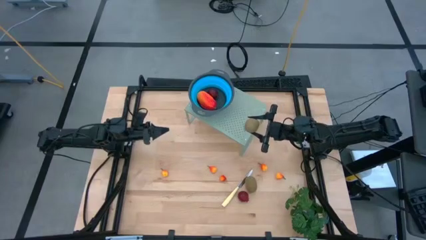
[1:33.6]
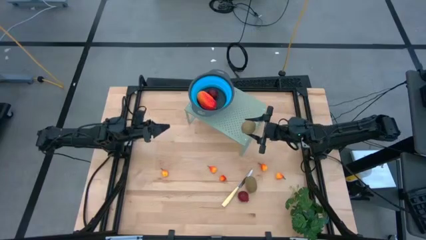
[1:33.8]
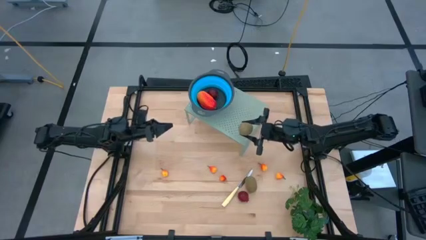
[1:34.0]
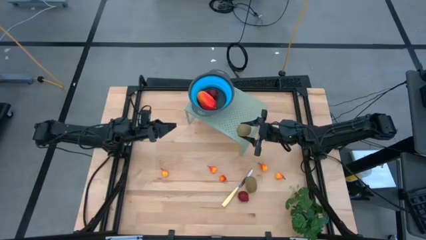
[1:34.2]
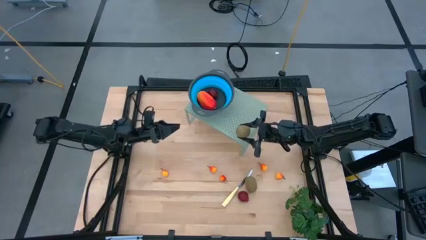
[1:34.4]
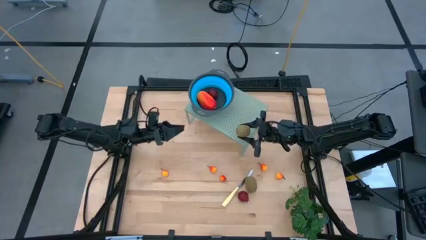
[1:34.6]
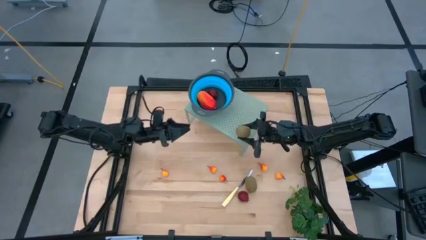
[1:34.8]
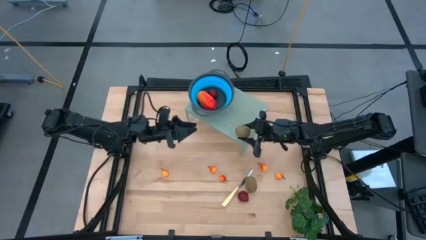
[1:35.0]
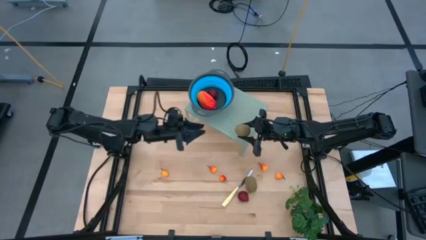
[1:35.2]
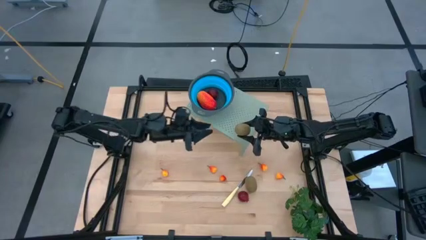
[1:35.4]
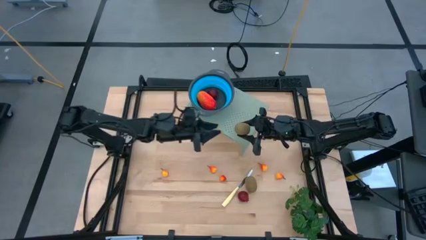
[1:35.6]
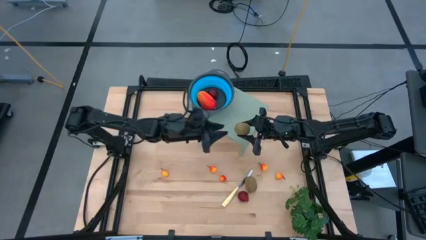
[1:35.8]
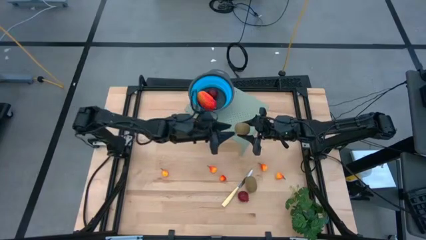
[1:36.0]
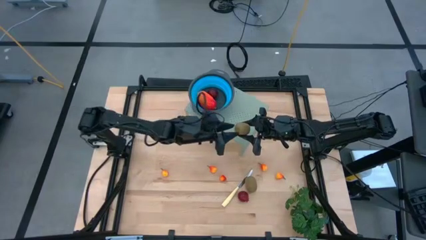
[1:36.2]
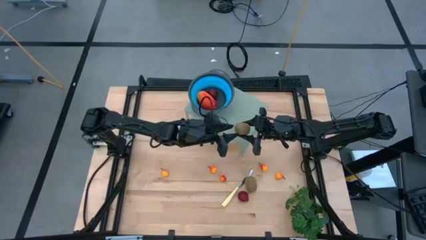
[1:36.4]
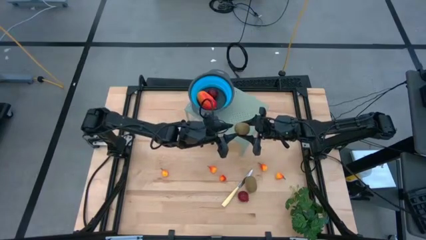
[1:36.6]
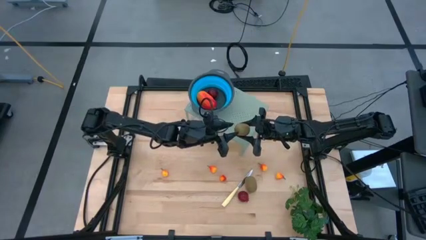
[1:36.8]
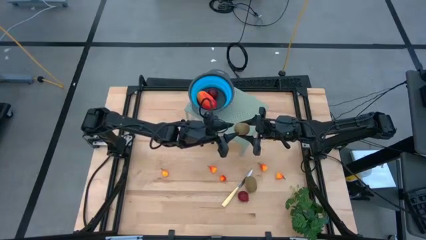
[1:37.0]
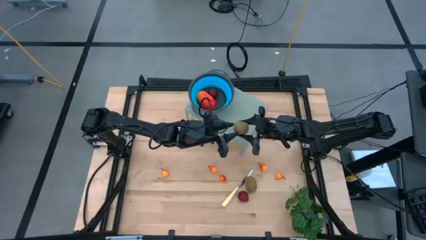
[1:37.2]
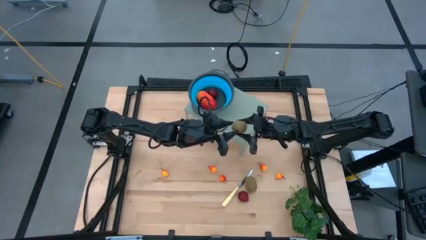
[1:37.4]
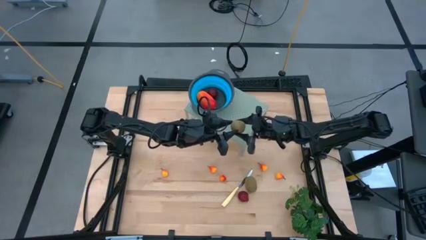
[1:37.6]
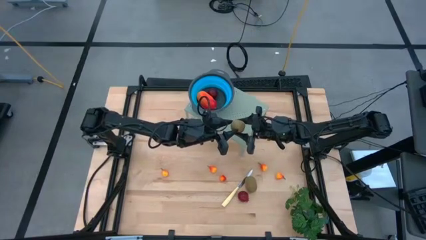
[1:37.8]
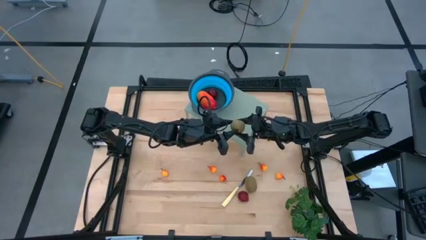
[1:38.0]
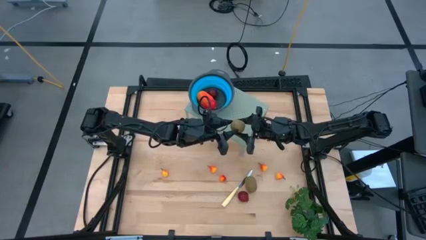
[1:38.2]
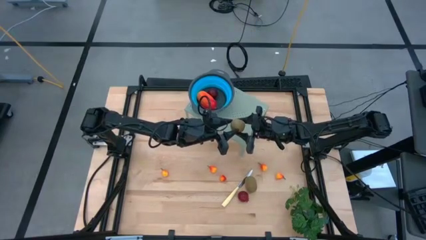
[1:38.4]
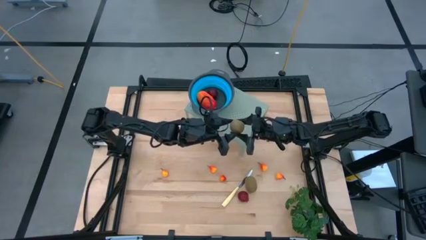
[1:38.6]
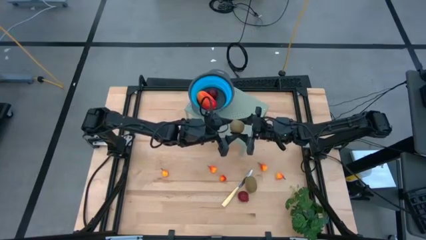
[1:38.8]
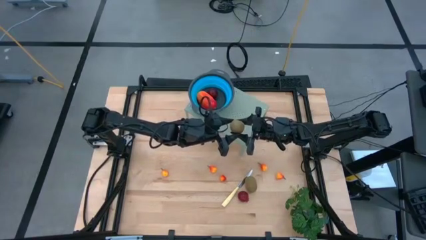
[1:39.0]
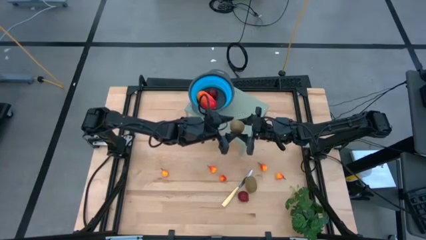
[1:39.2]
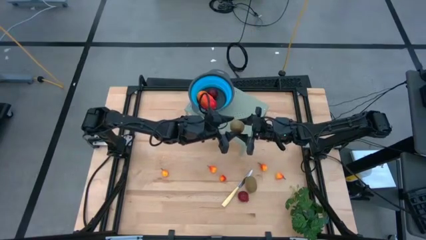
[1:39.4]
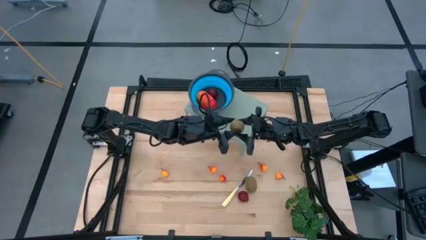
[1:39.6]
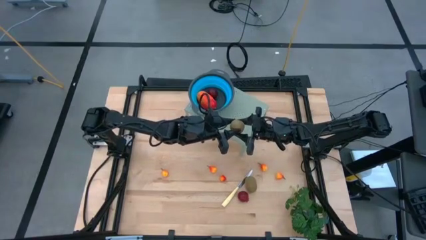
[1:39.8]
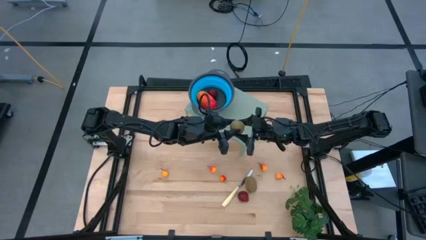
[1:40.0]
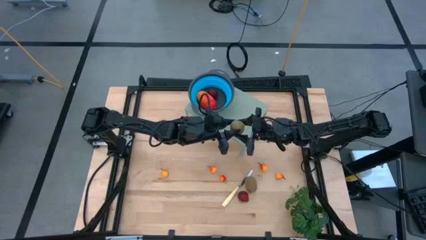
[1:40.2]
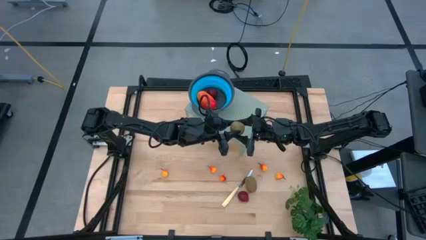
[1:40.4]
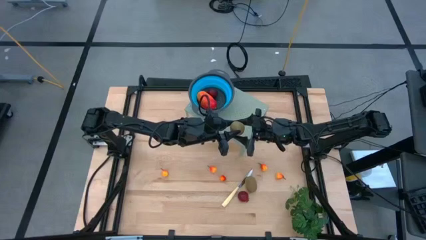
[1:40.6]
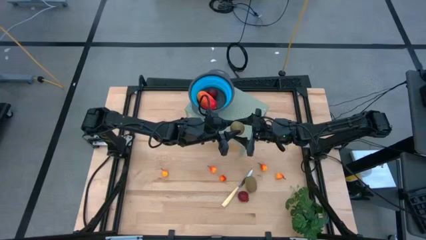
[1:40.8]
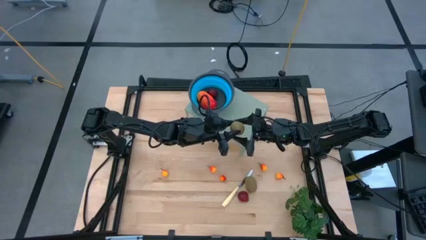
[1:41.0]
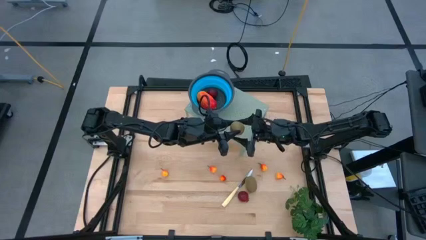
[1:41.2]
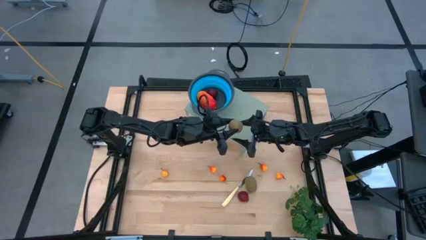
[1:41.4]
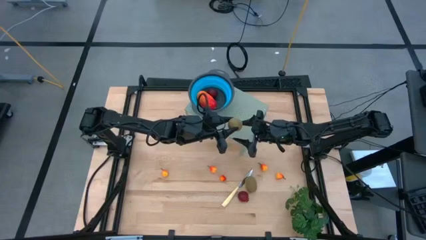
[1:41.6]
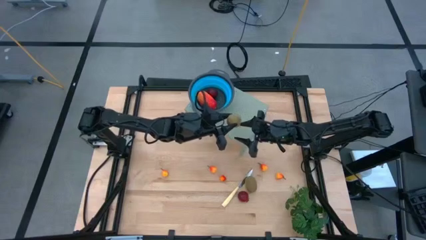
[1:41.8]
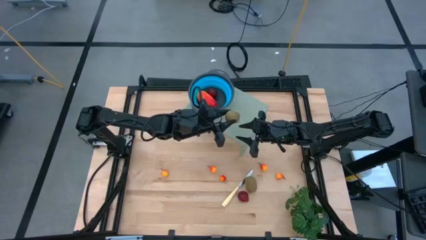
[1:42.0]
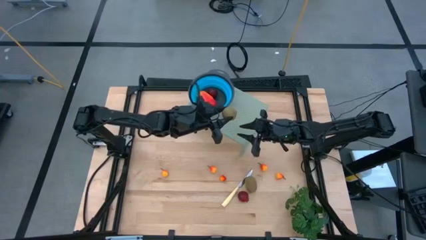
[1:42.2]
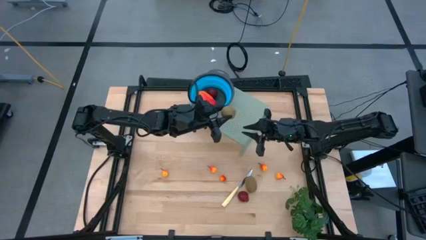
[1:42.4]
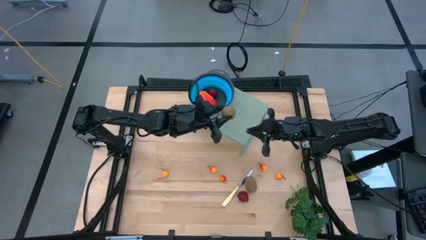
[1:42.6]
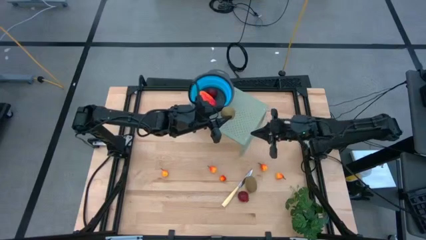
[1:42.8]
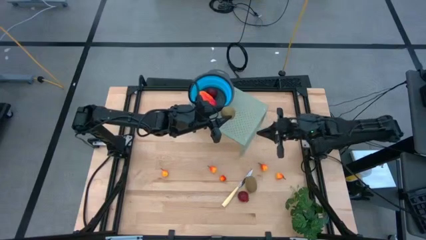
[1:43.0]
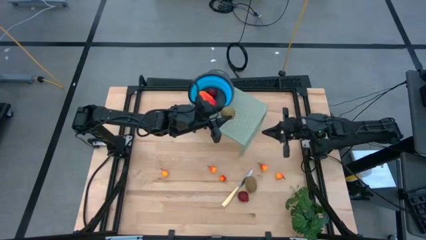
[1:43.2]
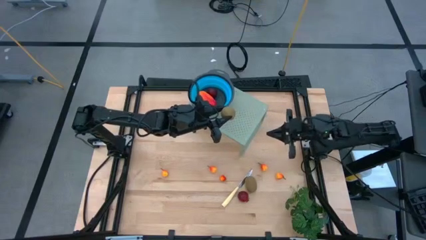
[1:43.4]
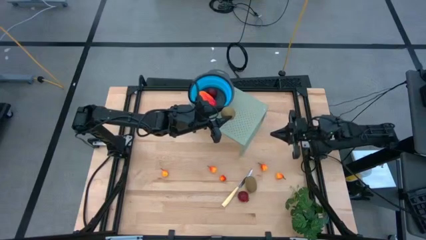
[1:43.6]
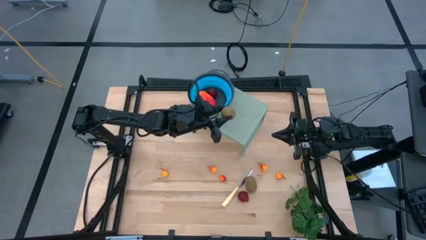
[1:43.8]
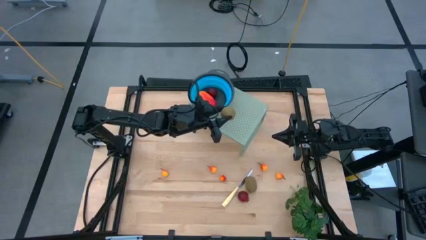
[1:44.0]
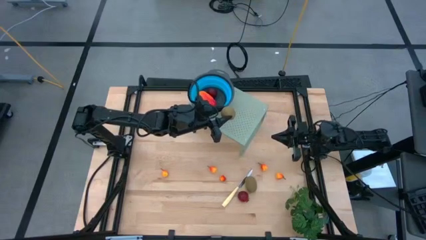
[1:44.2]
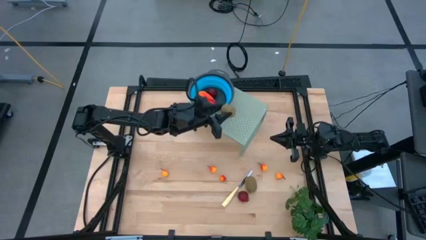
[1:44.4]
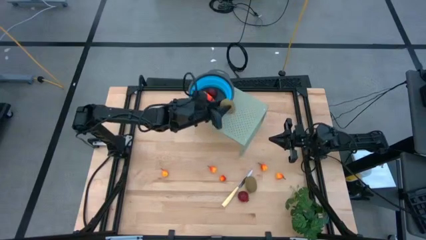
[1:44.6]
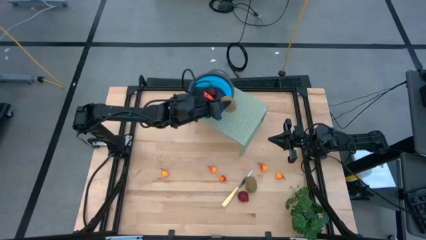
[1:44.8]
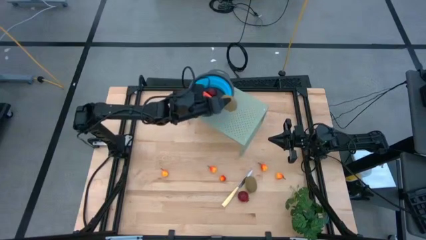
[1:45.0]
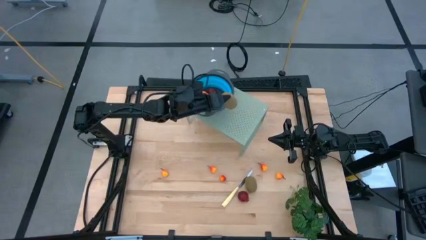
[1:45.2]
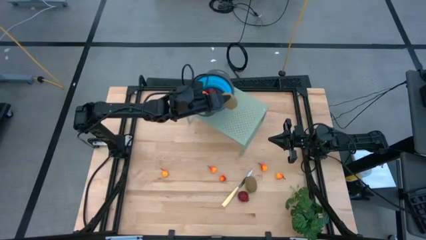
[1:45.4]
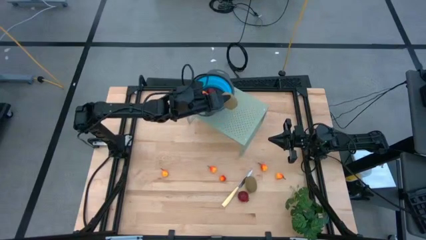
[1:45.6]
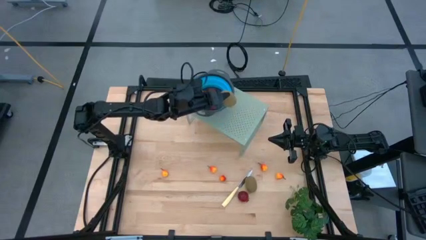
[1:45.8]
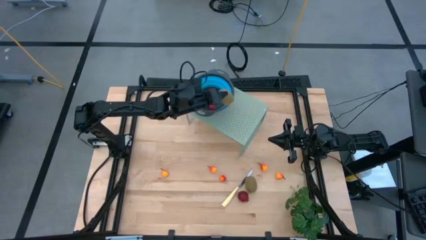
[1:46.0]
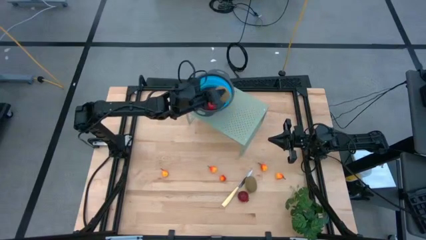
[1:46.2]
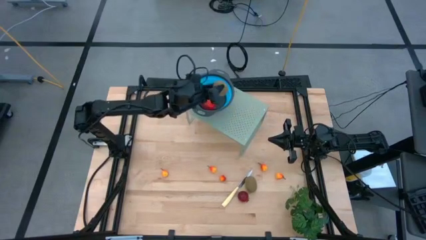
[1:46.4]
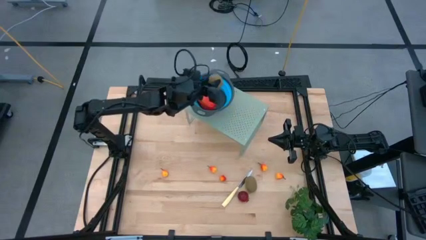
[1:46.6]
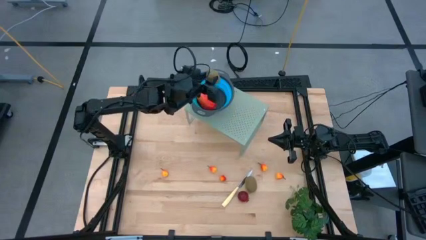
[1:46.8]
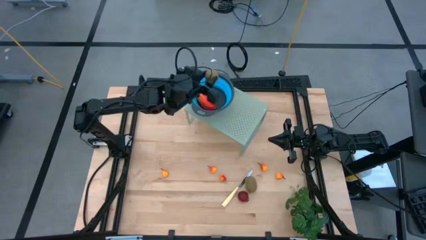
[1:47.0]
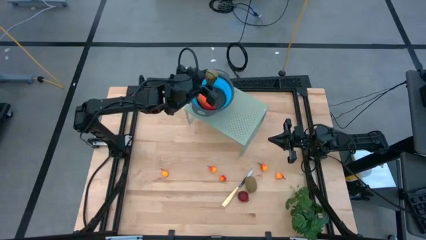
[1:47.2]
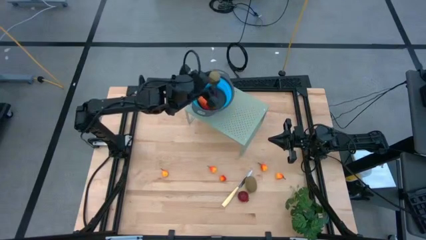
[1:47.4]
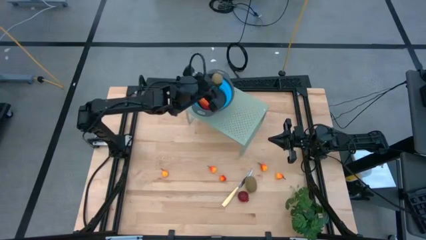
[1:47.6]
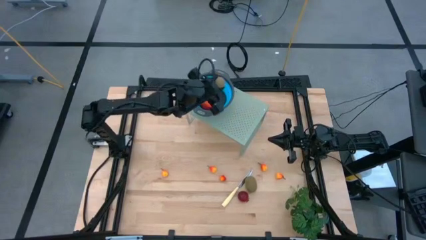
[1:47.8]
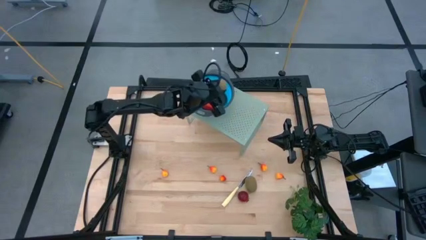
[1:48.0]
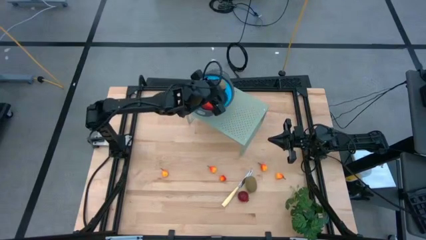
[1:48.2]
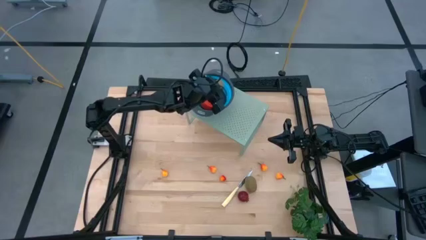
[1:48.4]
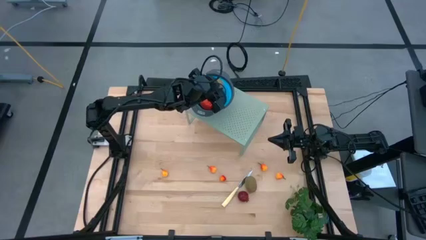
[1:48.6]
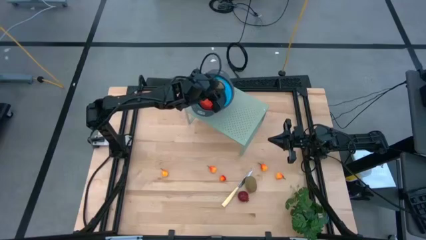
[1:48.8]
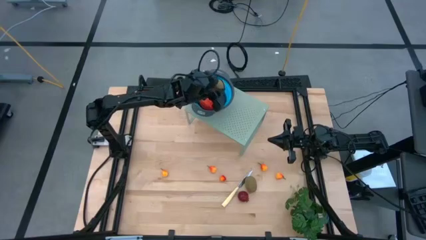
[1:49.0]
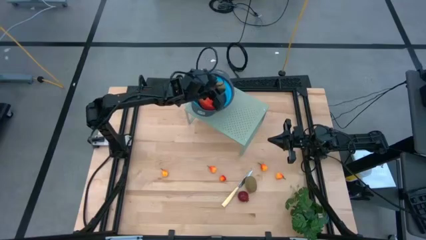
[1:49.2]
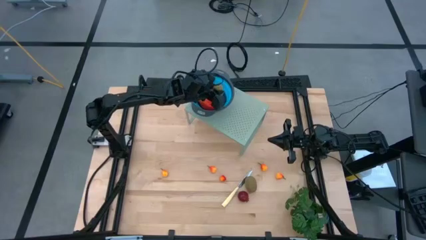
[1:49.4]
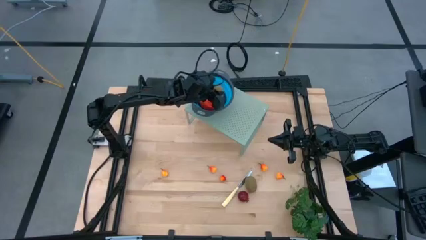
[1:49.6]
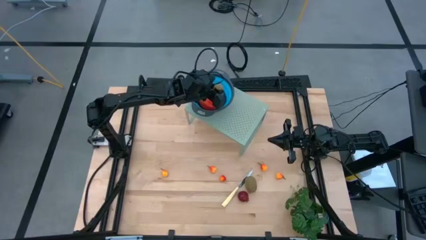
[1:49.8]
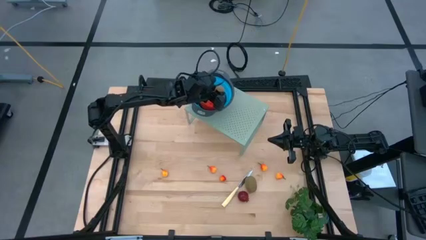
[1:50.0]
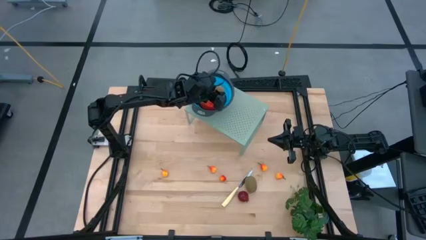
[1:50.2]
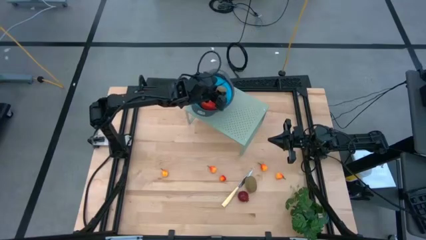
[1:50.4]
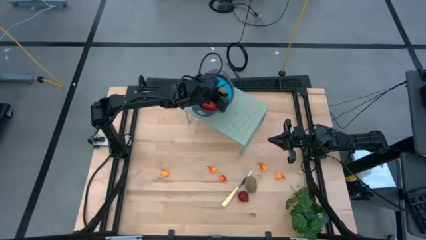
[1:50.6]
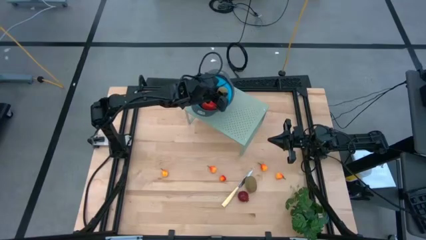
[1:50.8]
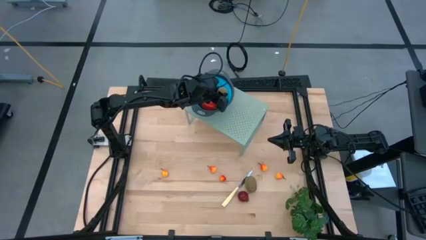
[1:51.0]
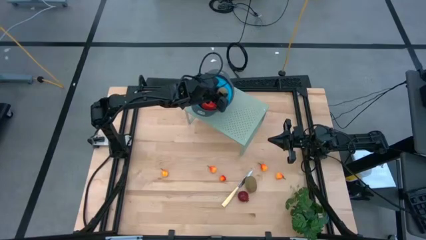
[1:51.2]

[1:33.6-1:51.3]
Task: Pick & Place Fruit
Put the kiwi into the blue strainer bowl on the shelf
